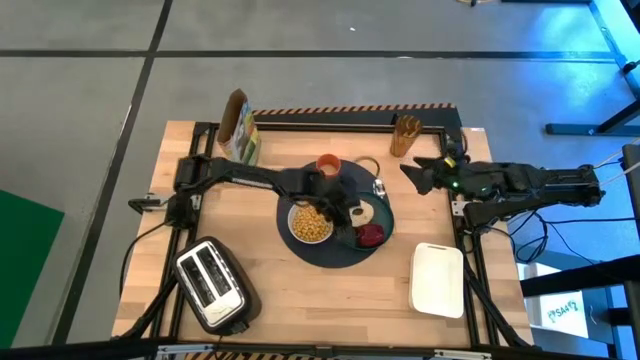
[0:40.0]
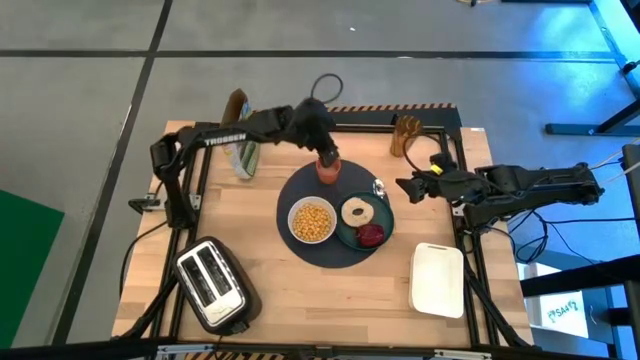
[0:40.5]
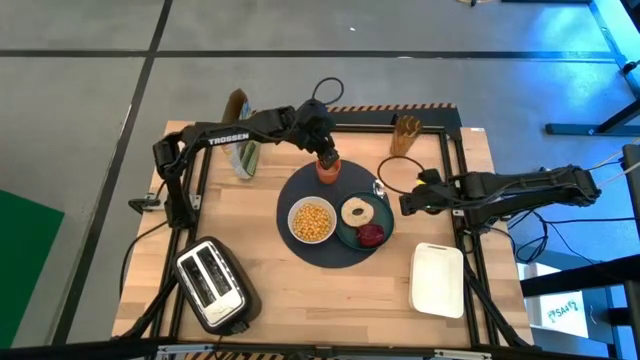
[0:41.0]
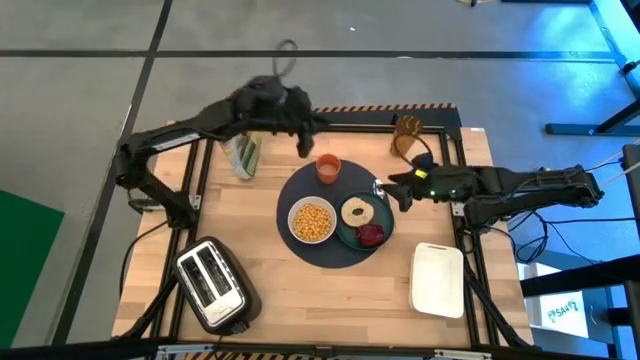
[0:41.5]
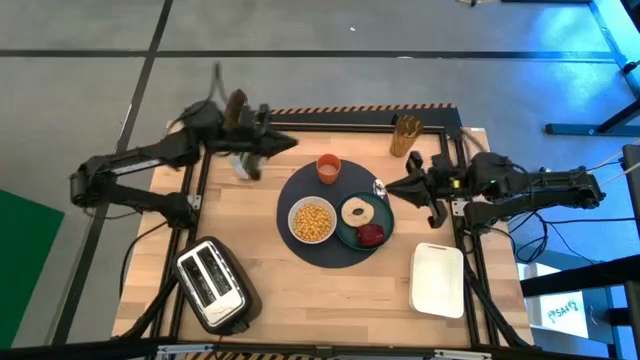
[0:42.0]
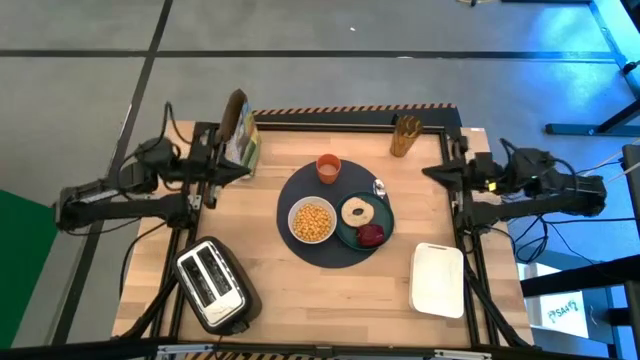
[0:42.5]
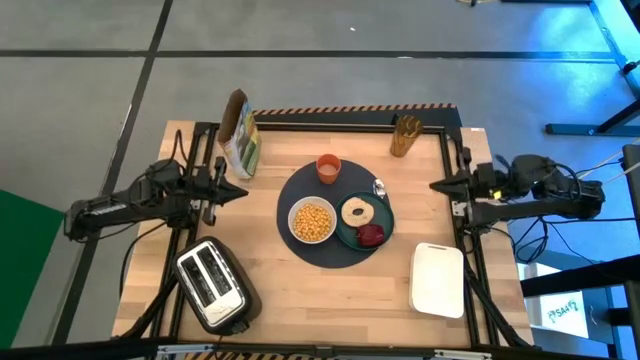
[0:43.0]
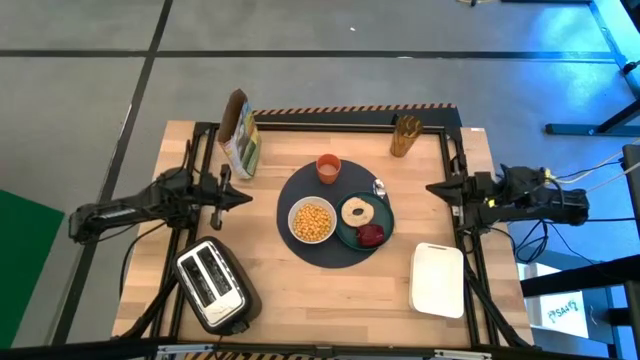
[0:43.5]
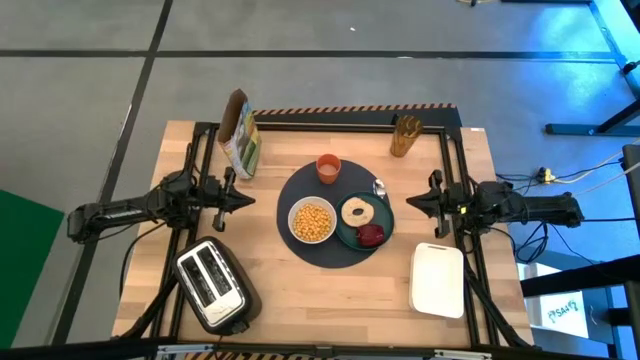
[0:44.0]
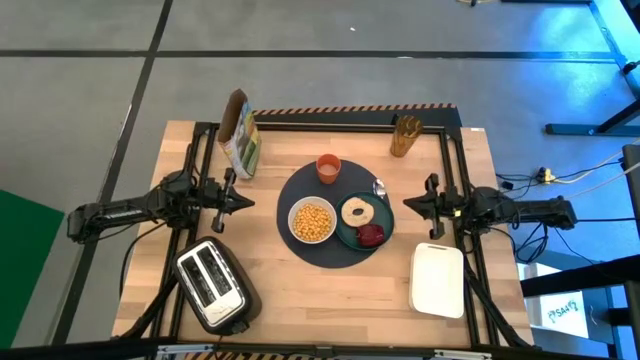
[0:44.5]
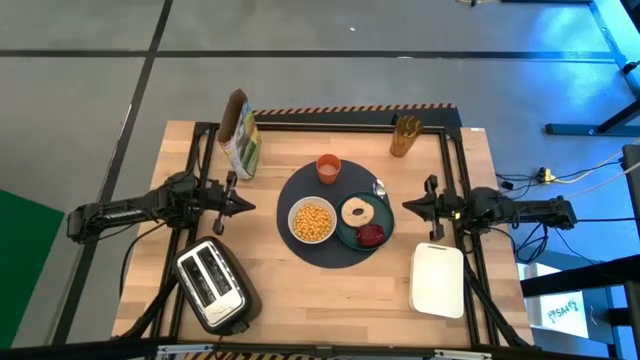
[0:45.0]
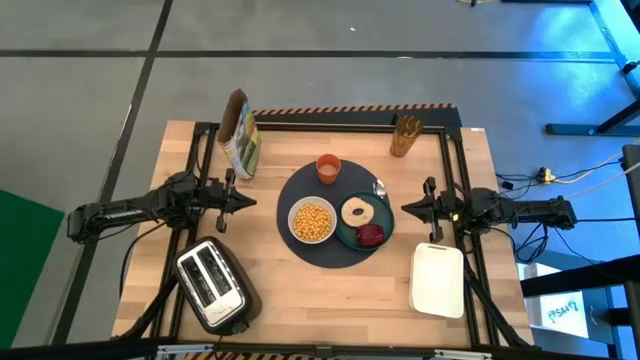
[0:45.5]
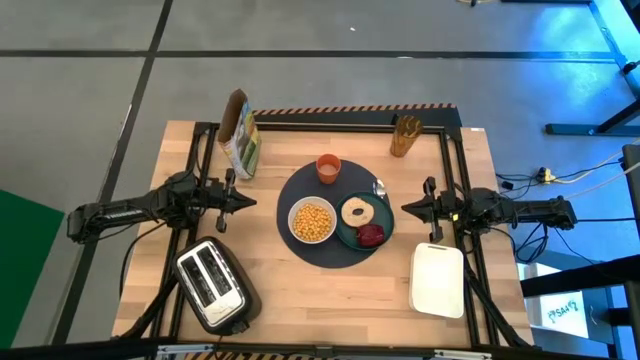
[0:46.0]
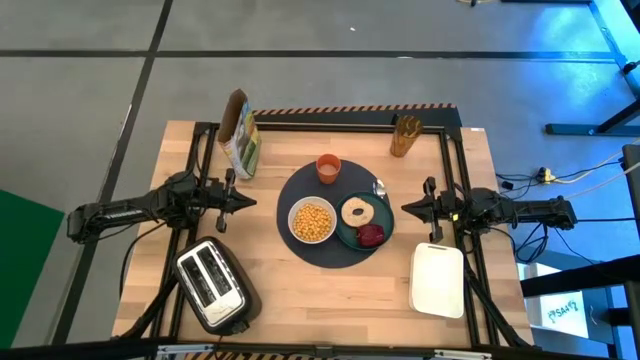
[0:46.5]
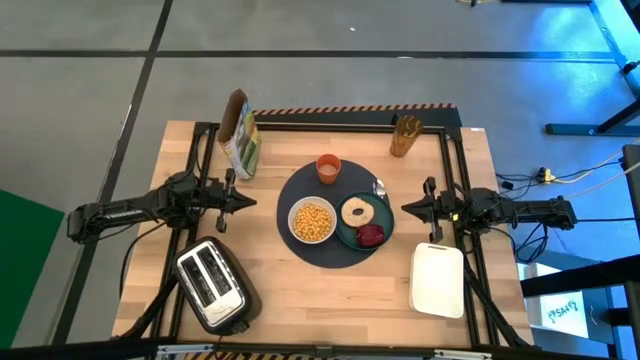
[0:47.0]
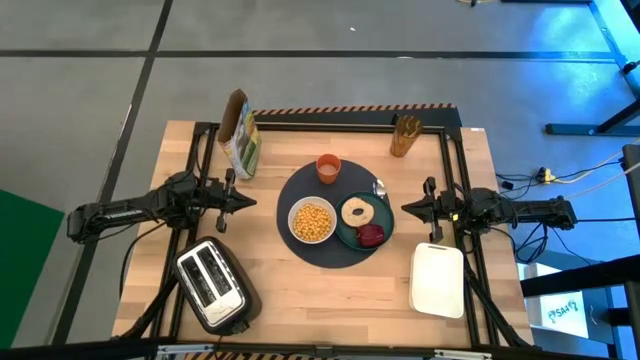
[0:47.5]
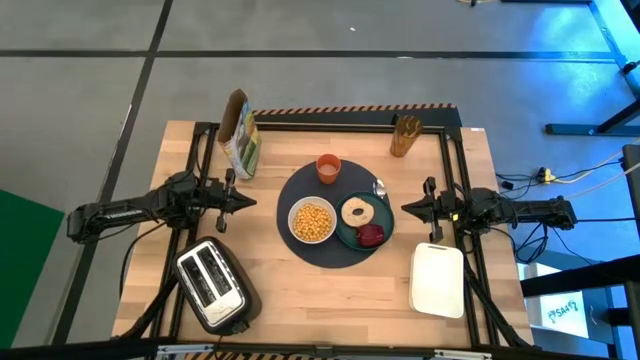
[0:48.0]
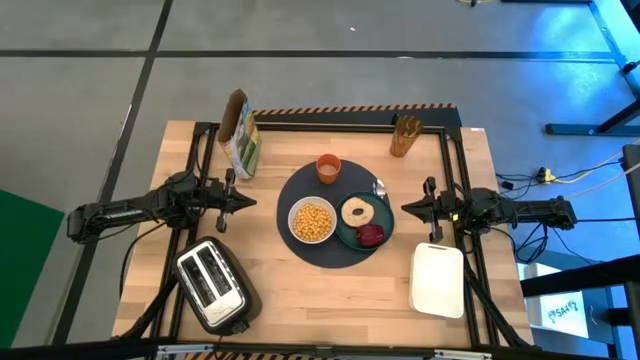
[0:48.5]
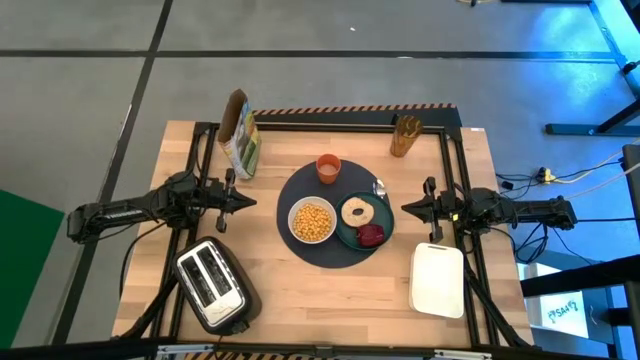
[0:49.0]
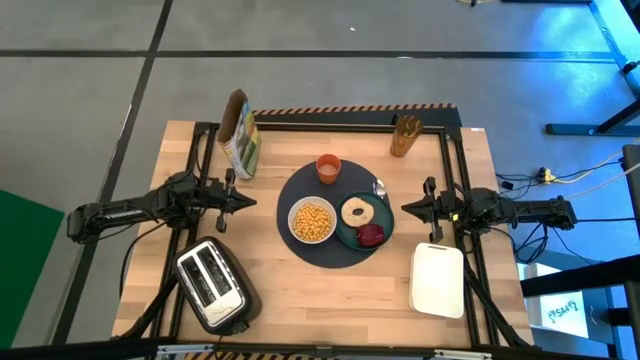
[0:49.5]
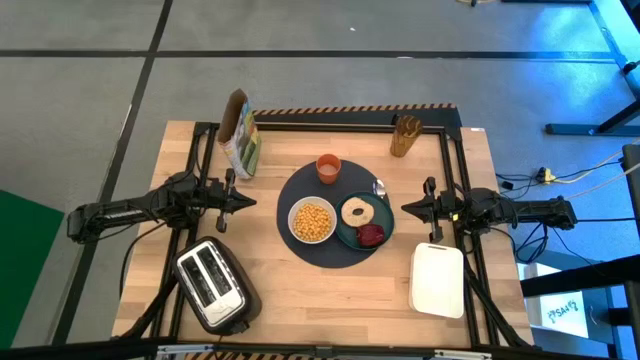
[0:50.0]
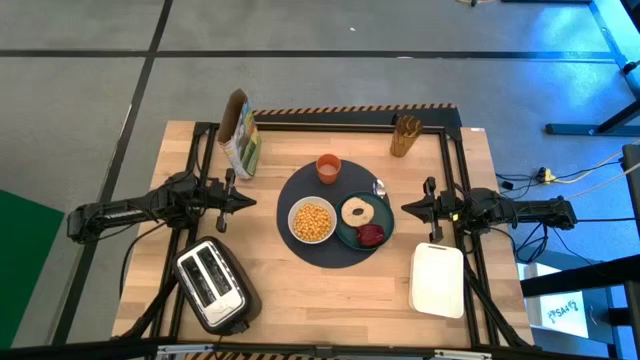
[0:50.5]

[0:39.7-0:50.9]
Task: Arrange a breakfast setting
Return to Home Position

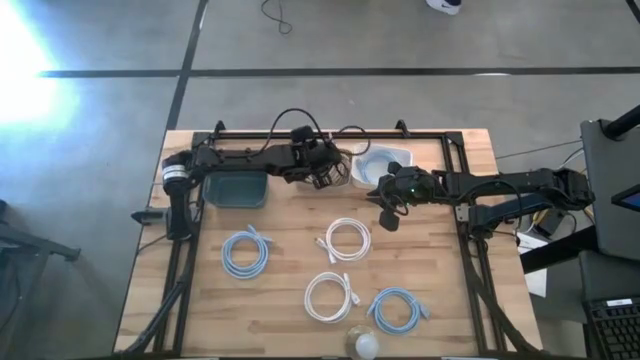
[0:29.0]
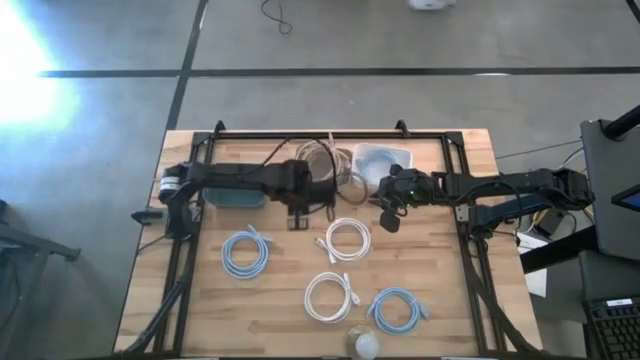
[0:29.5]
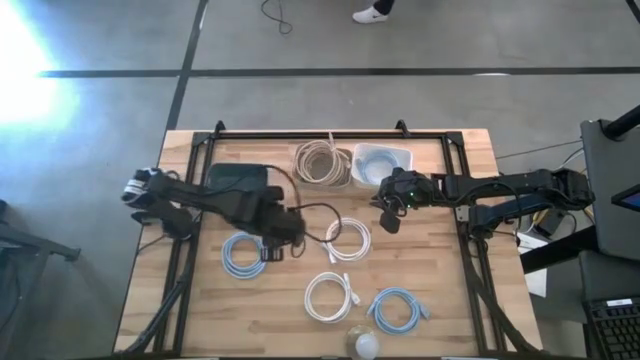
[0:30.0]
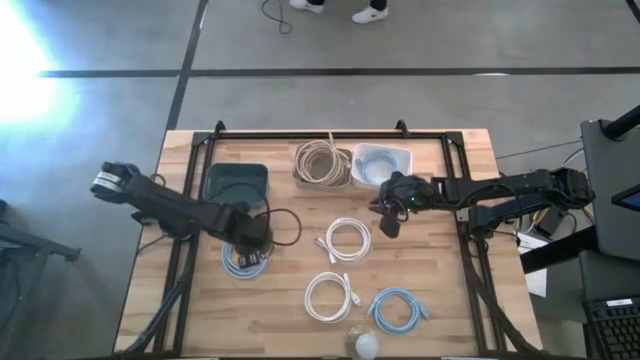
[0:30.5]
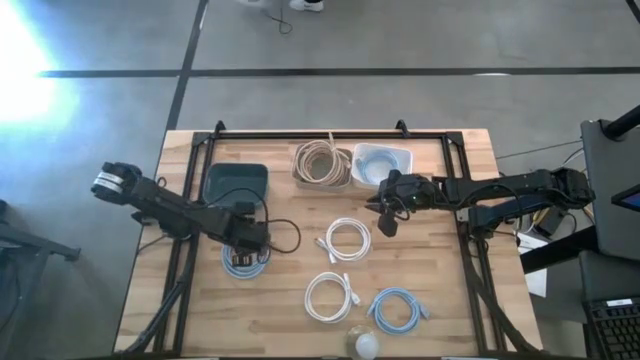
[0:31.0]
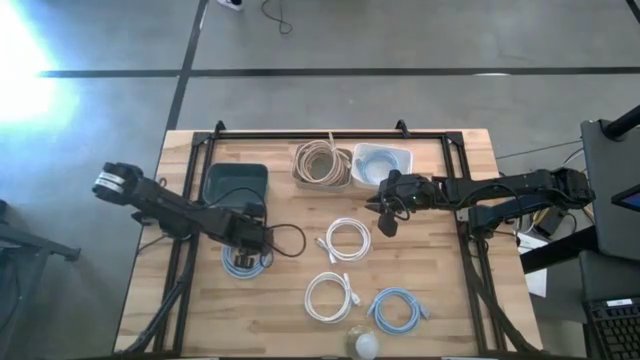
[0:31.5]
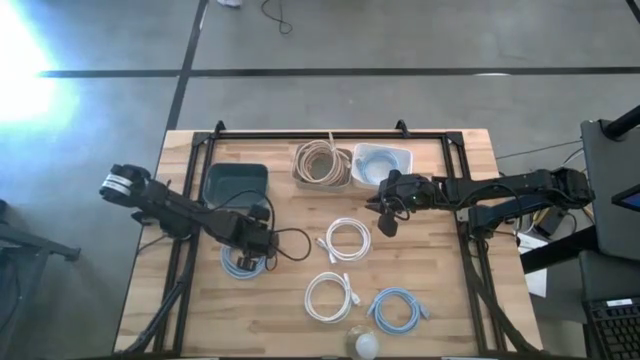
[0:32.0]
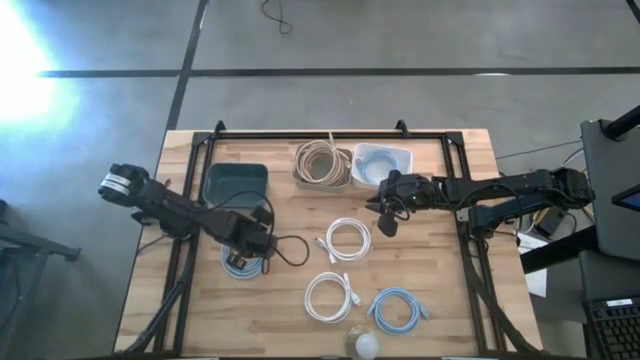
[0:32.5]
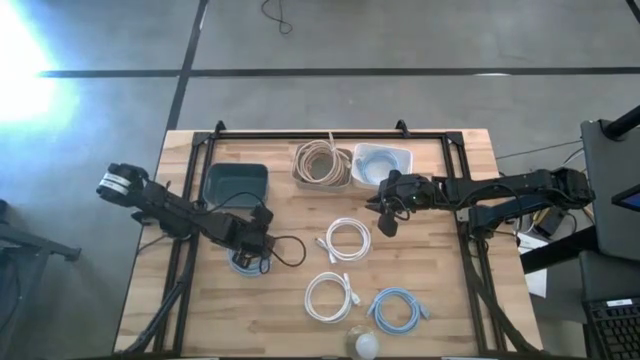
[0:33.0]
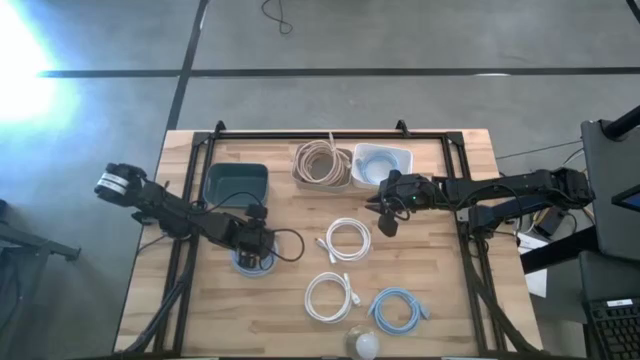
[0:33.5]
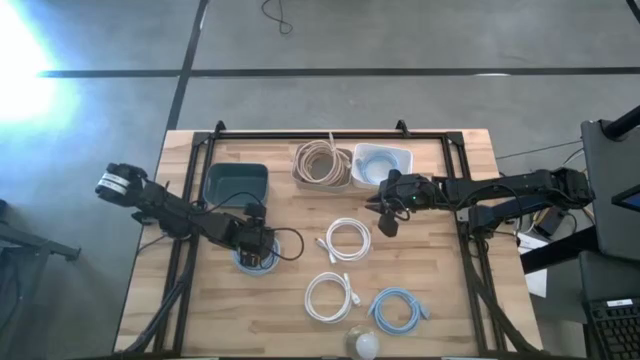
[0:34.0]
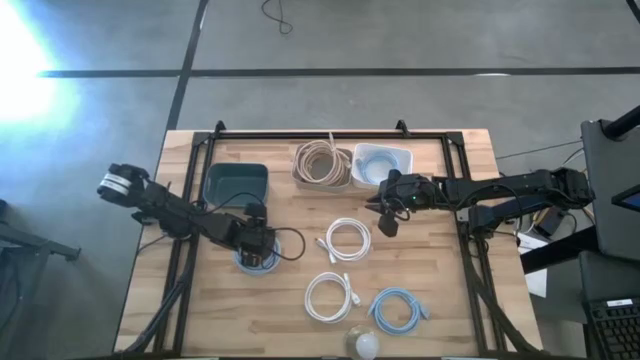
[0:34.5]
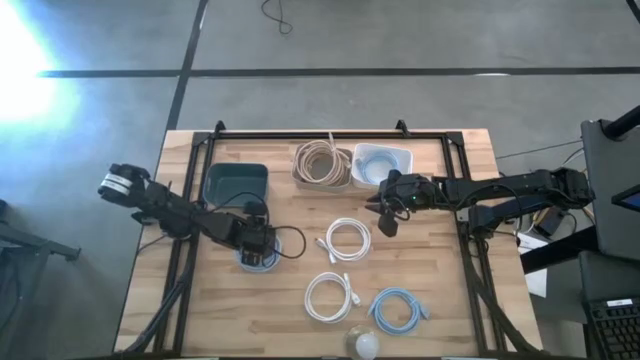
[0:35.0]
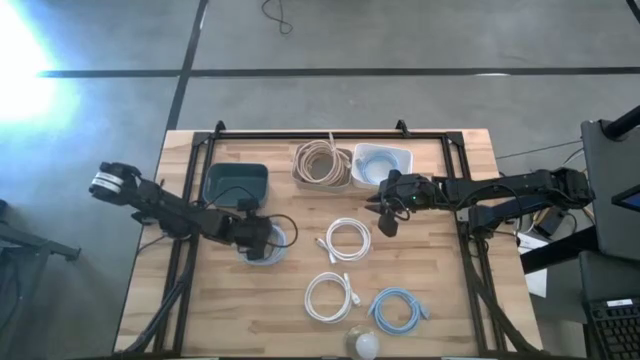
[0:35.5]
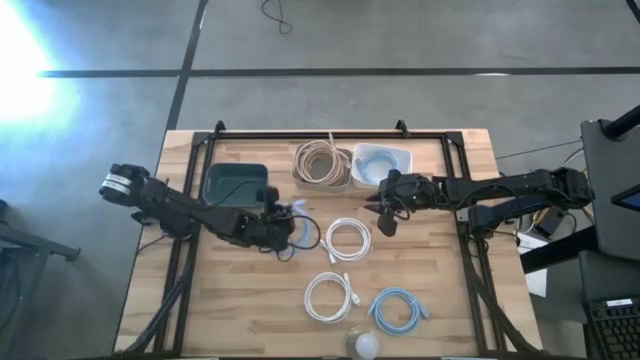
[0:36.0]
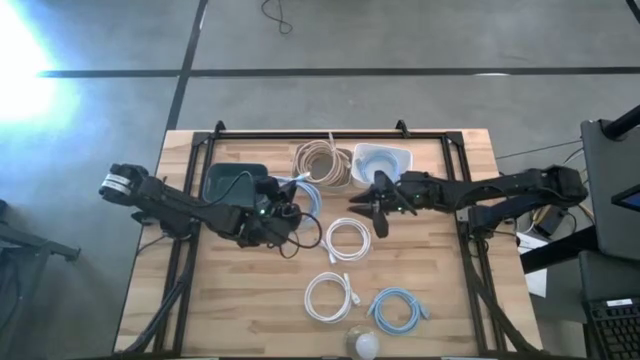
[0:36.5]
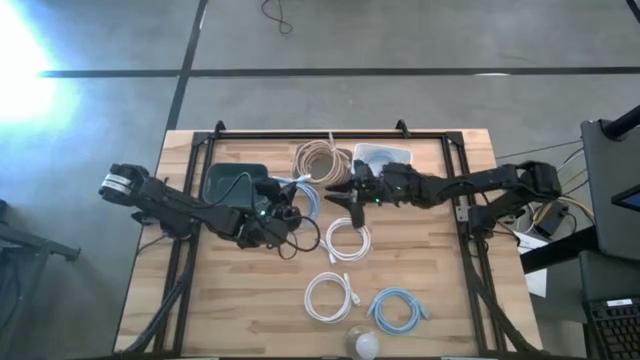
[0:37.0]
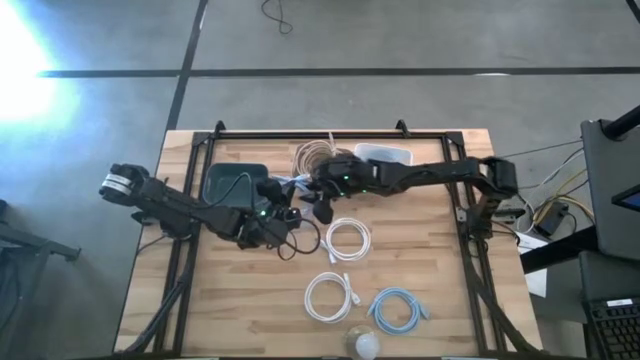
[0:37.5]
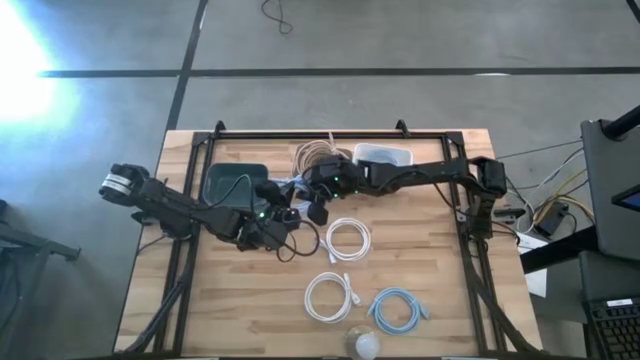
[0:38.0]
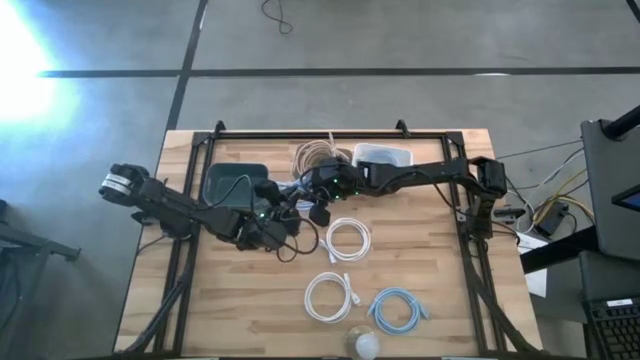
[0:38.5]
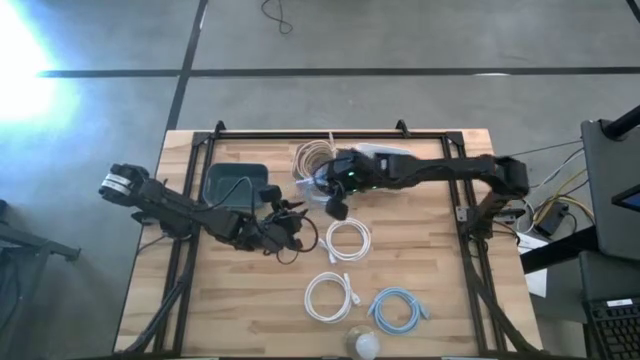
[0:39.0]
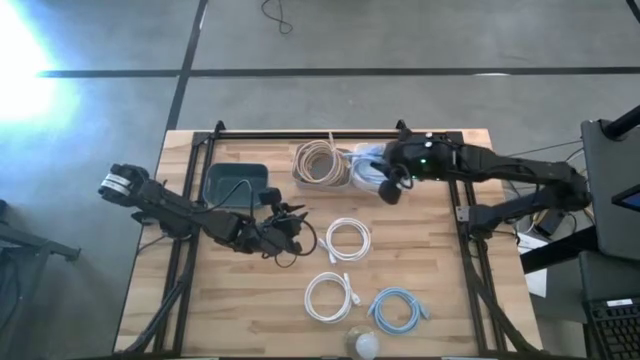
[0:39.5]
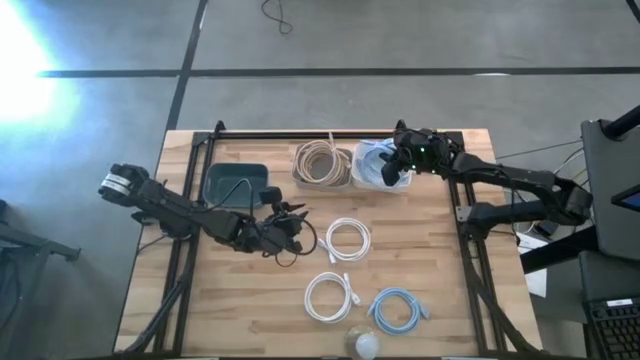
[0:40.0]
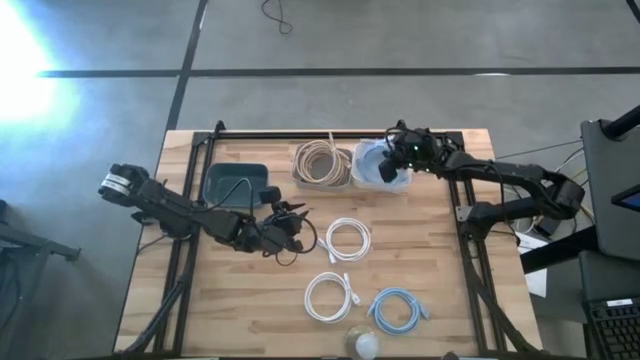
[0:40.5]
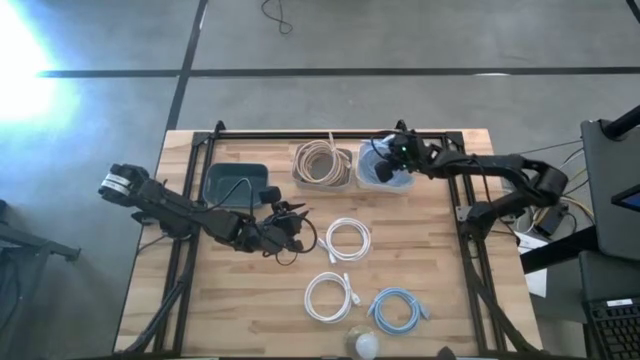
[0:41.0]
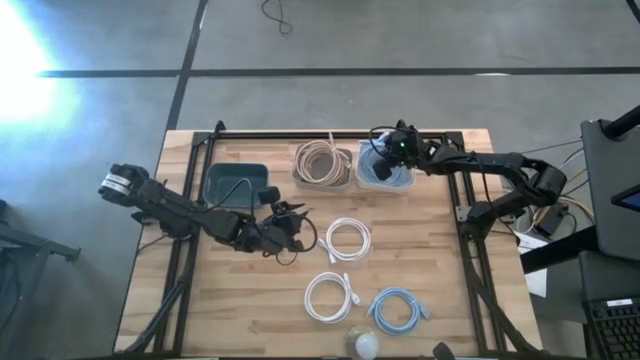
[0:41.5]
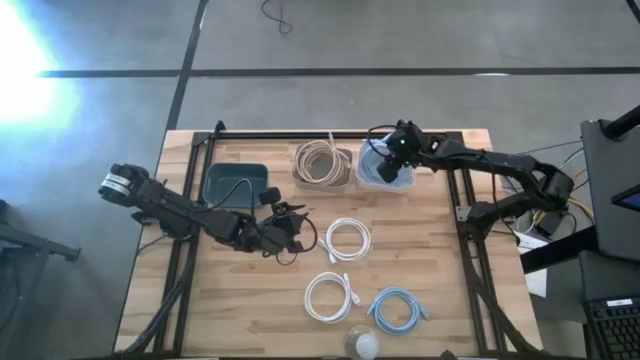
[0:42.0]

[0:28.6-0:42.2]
Task: Pick & Place USB Port
Put the top blue USB cable into the white bin
